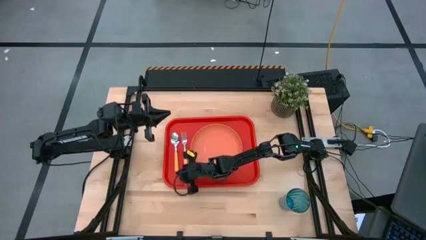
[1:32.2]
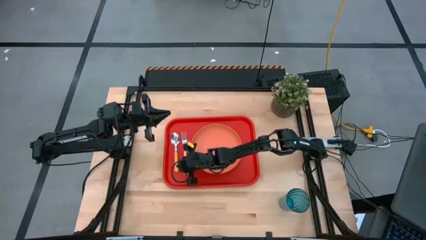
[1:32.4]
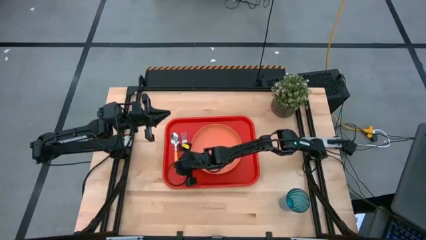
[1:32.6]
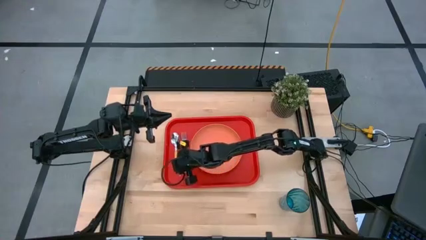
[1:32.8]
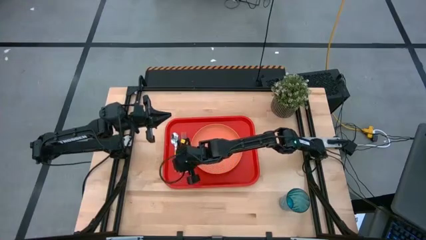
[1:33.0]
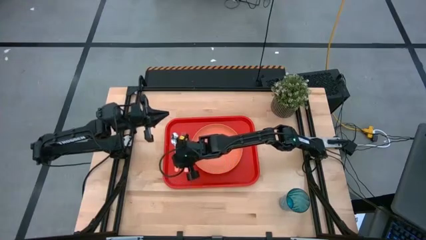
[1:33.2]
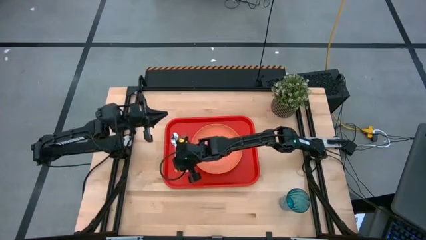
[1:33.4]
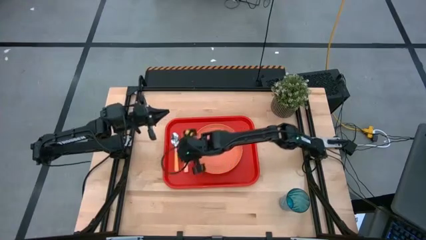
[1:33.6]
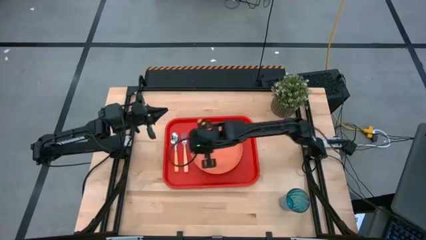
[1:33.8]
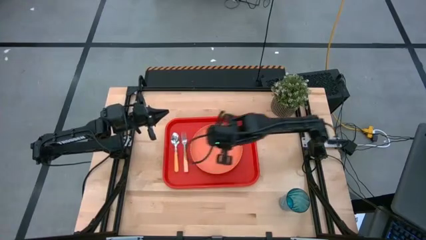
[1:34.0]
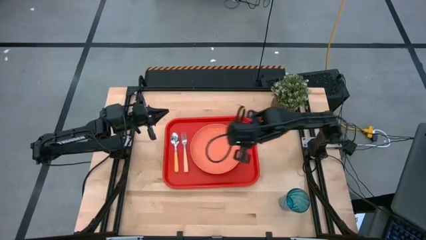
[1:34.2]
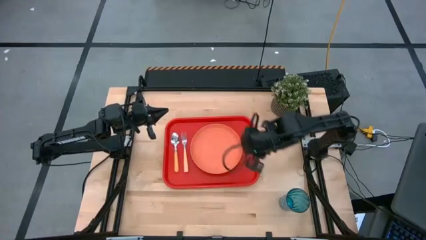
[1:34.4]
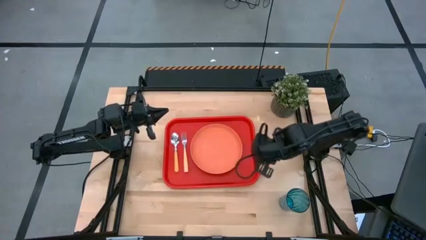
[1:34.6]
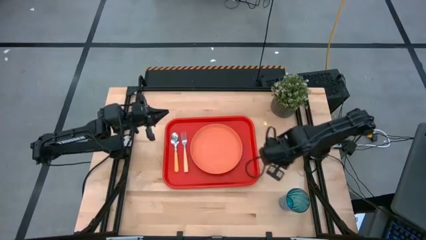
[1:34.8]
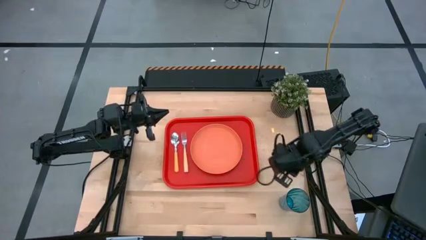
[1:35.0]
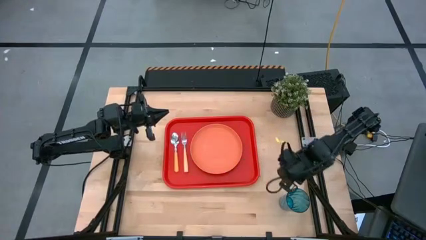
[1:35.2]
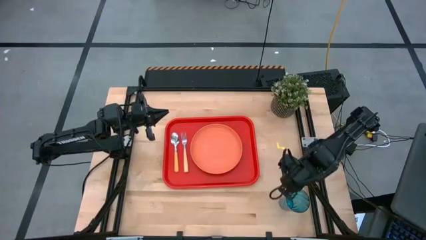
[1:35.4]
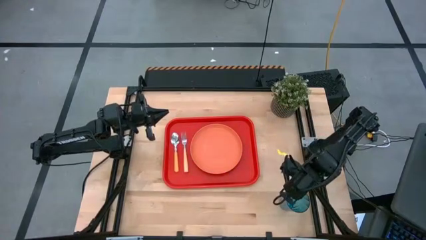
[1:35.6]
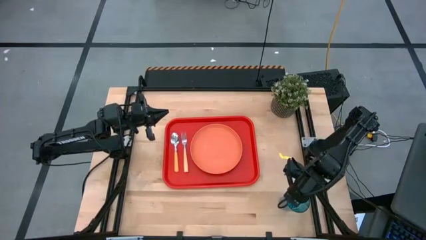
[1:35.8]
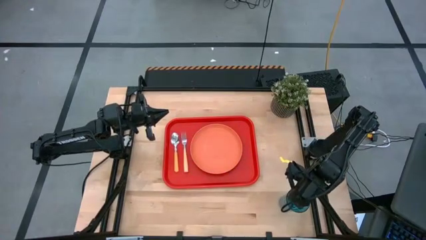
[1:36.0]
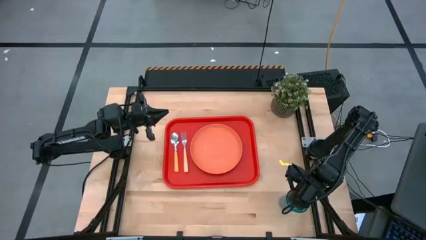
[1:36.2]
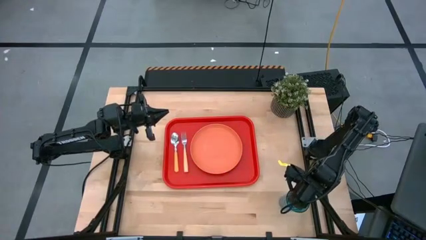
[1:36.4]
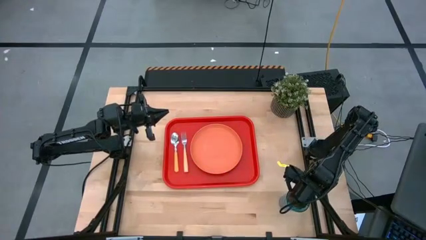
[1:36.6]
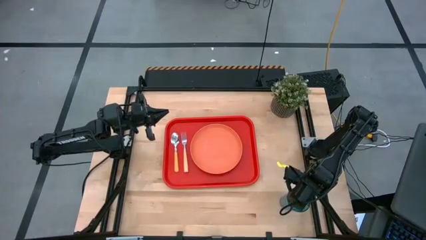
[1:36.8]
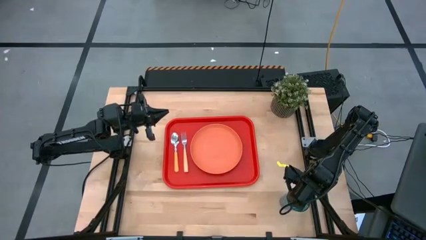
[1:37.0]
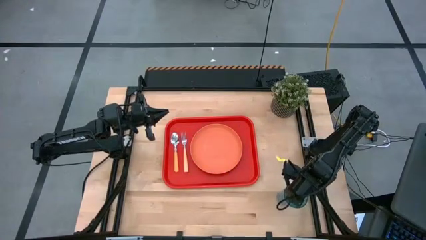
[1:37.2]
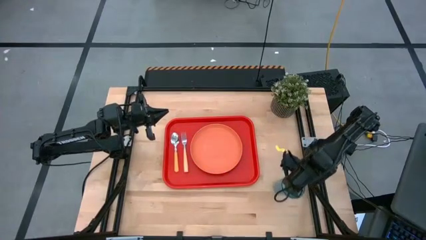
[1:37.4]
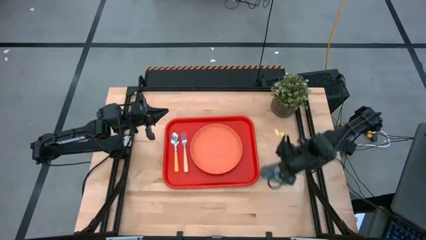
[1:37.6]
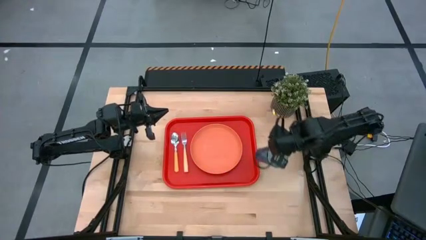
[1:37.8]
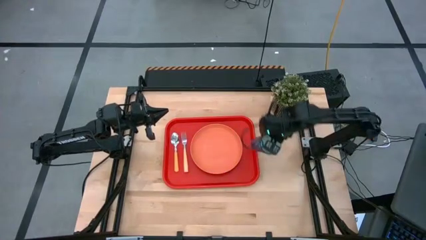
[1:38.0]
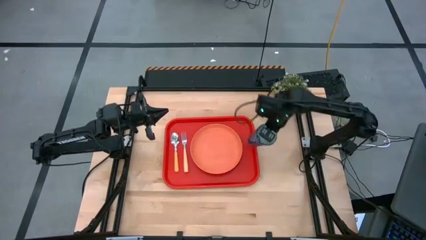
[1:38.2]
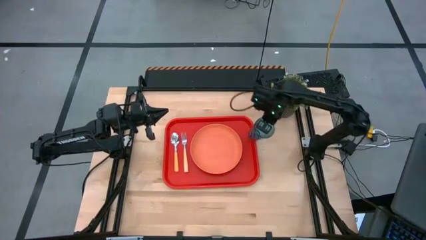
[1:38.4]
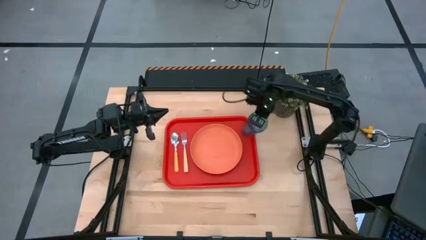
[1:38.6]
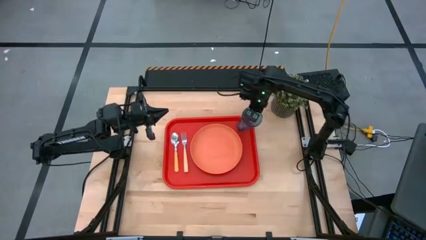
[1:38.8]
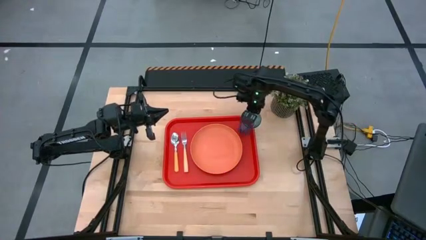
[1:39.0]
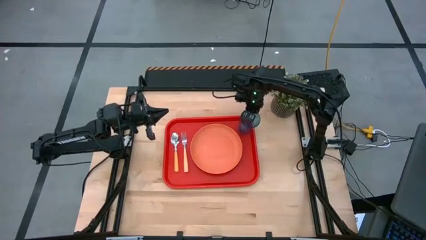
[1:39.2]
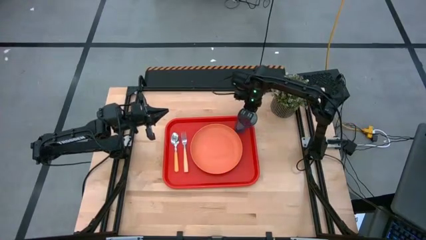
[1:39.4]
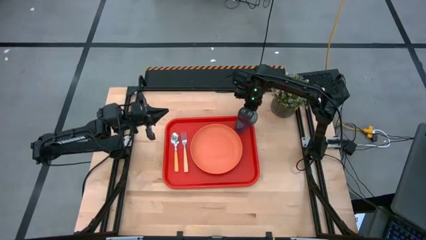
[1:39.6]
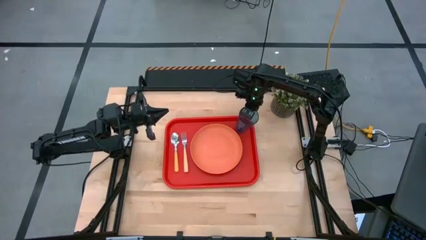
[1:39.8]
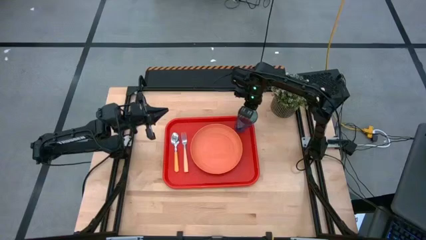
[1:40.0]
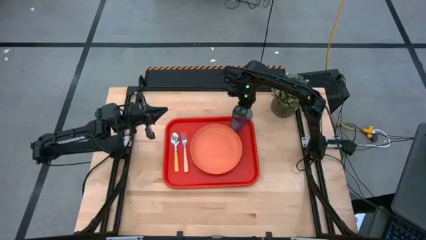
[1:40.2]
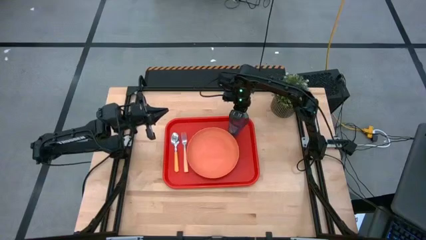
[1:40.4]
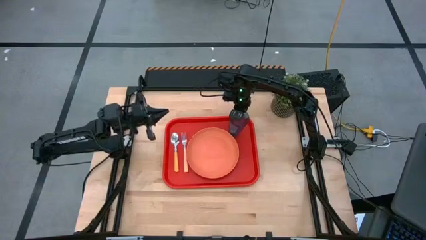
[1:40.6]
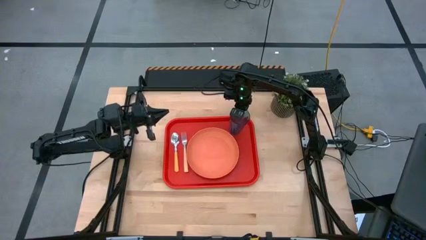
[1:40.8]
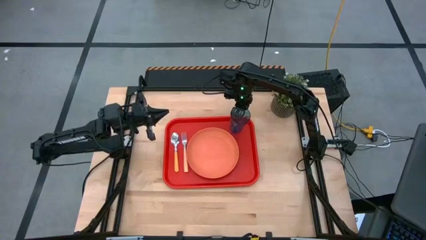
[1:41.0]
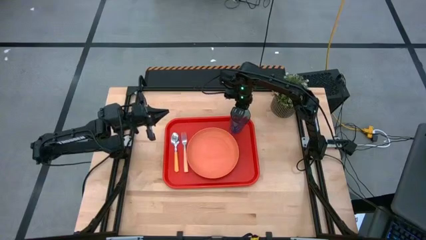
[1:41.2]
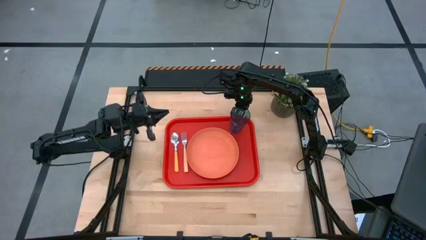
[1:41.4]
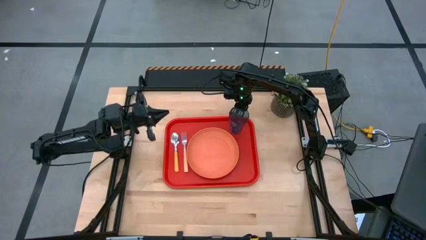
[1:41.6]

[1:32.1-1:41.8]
Task: Pick and place plate/cup/fork/spoon on tray
Put the blue cup on the orange serving tray

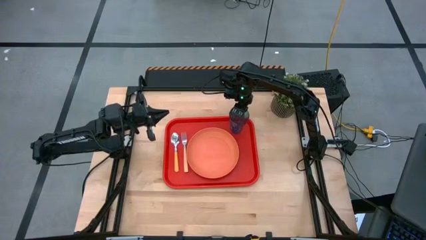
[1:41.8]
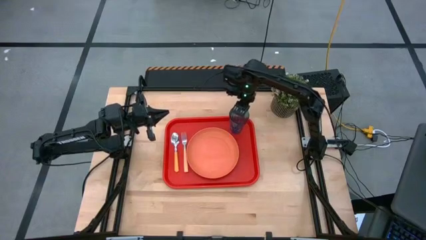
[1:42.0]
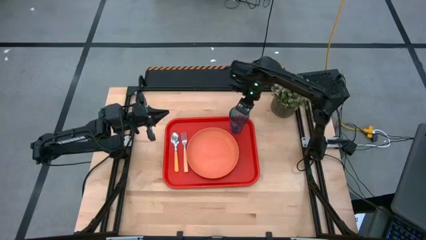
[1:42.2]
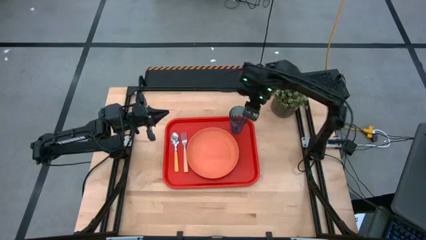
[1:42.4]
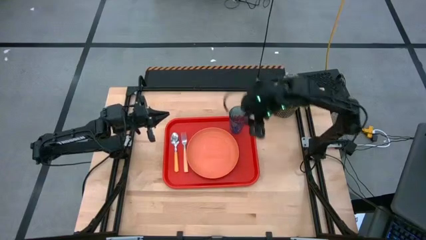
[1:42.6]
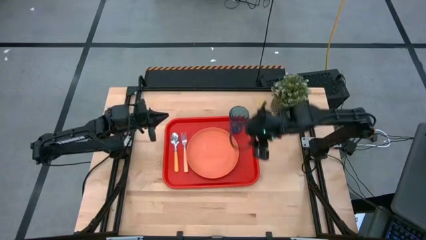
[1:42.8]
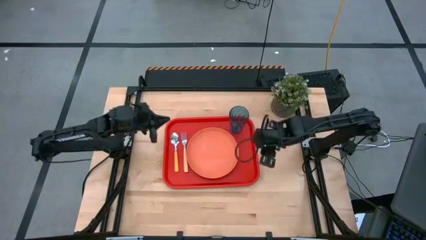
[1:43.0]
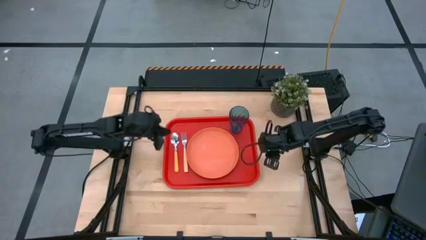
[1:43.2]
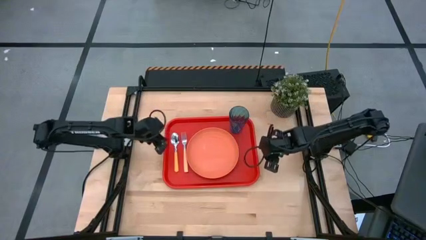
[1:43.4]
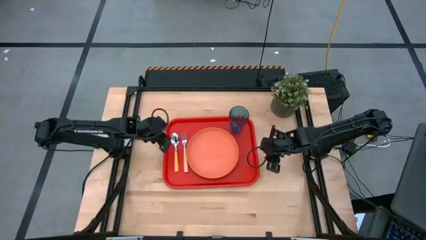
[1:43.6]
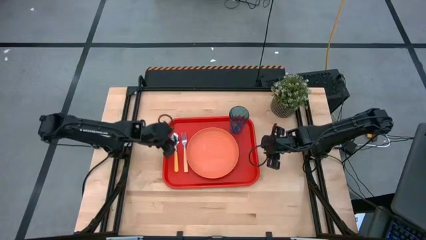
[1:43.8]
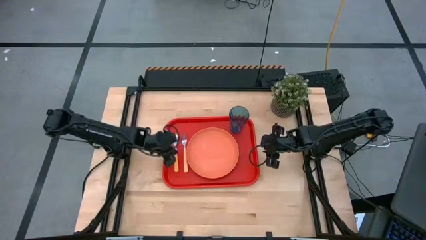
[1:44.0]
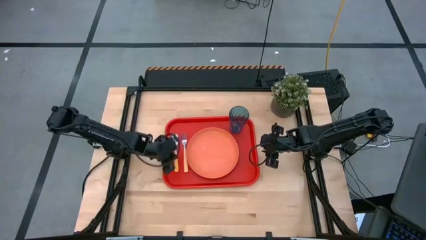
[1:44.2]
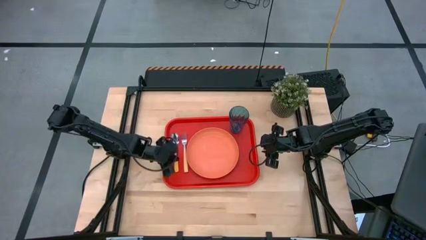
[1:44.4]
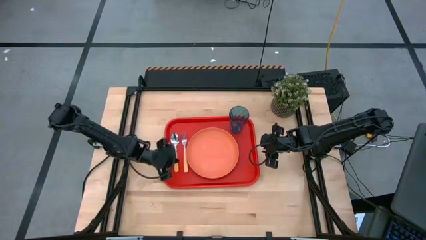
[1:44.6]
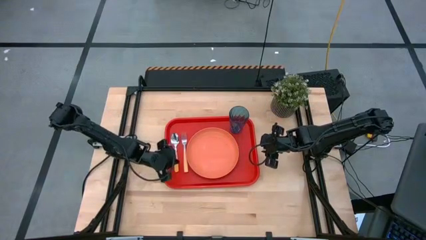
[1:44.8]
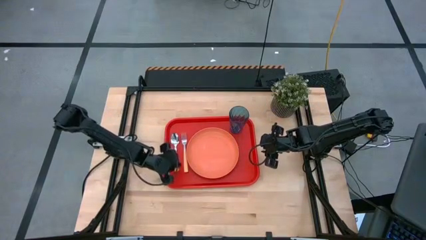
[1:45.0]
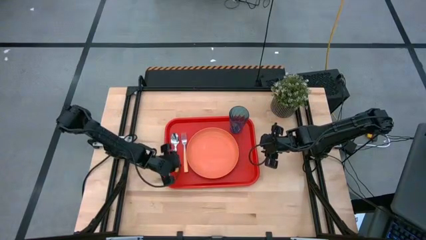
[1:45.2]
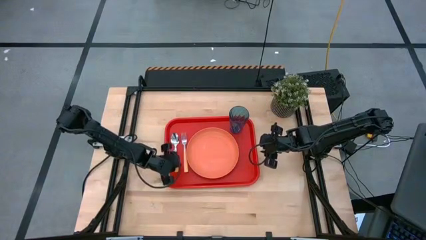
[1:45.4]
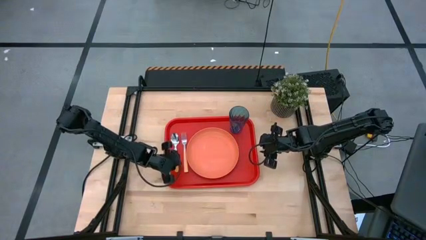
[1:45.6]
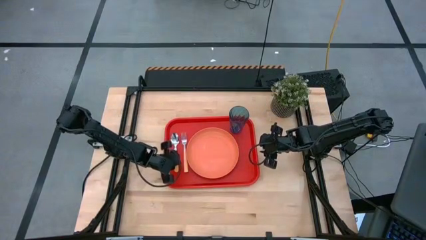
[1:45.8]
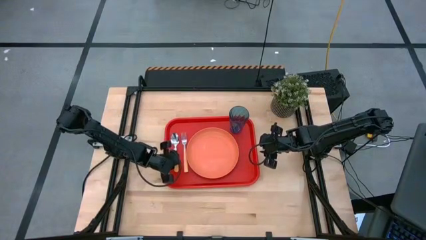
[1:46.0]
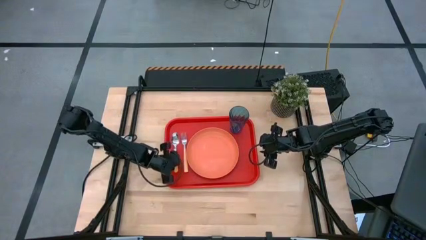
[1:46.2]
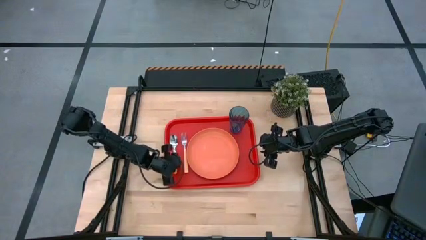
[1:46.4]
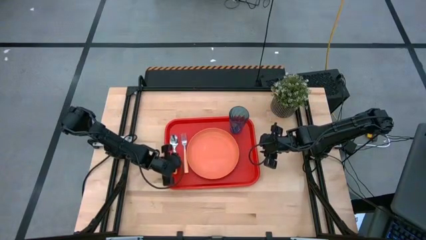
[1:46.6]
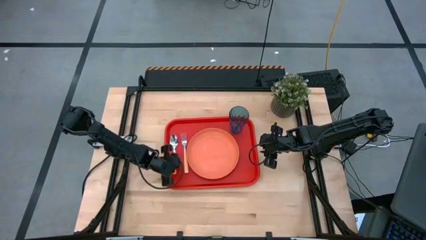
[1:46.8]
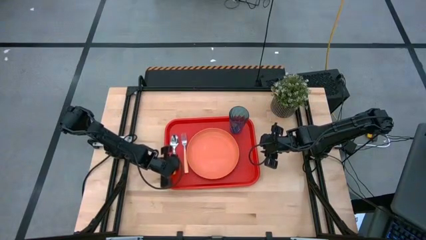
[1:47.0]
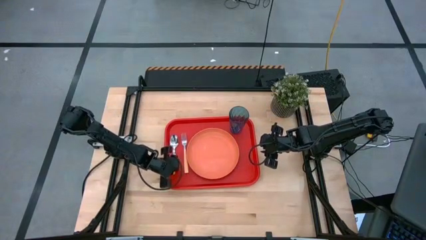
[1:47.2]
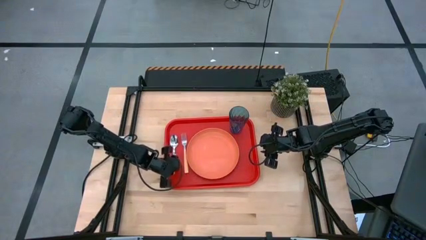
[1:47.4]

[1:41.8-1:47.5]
Adjust the the yellow spoon on the orange serving tray
